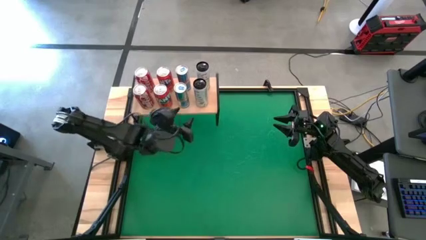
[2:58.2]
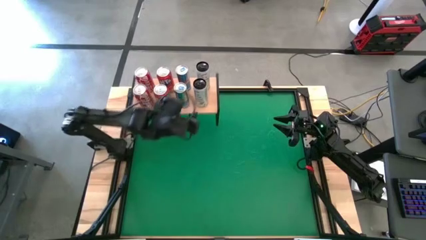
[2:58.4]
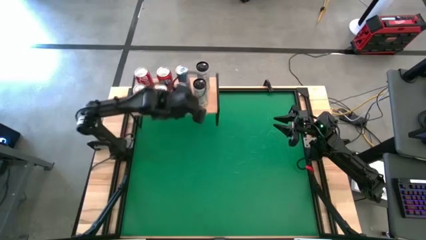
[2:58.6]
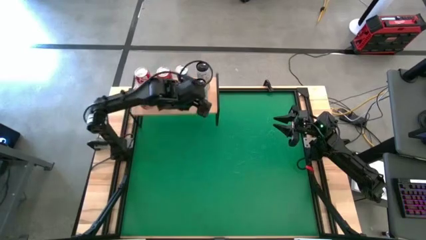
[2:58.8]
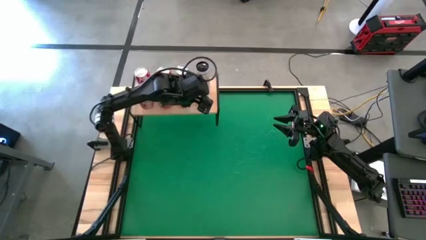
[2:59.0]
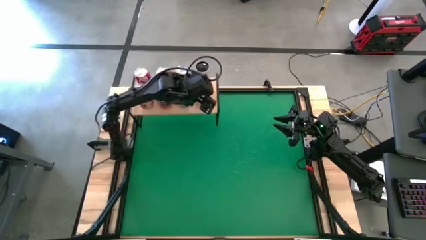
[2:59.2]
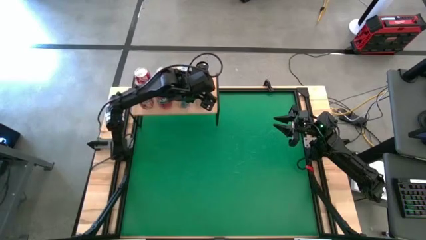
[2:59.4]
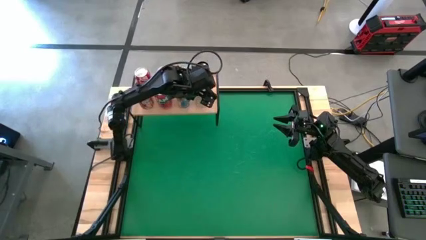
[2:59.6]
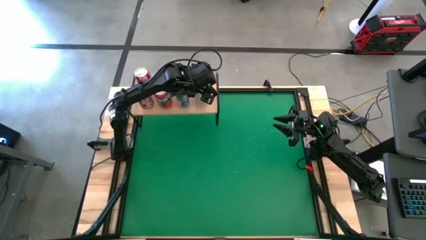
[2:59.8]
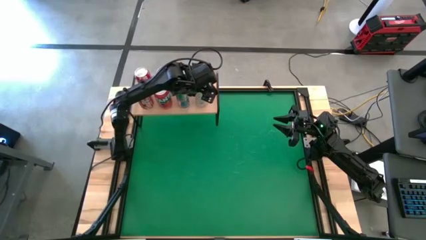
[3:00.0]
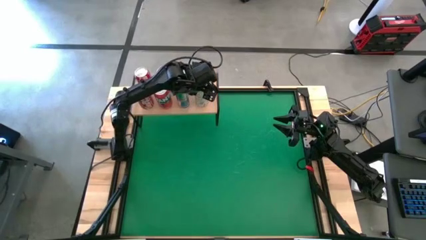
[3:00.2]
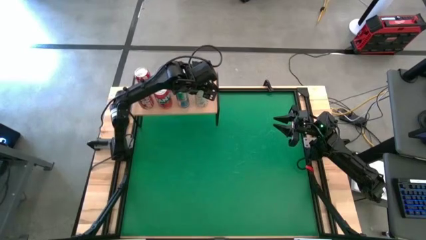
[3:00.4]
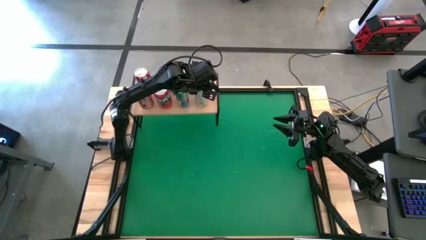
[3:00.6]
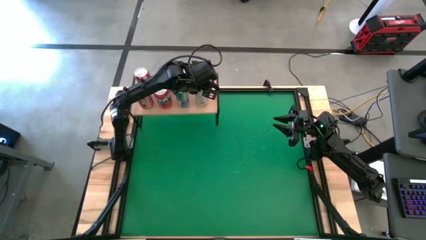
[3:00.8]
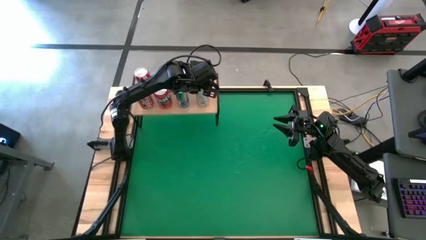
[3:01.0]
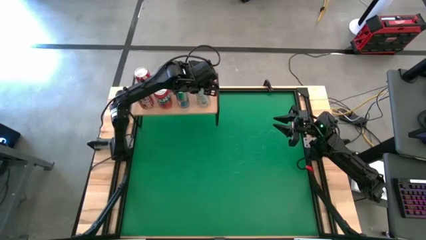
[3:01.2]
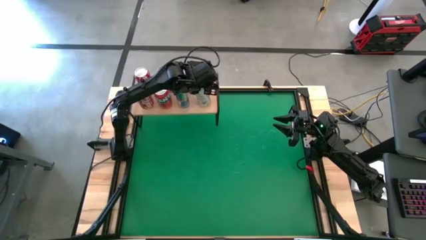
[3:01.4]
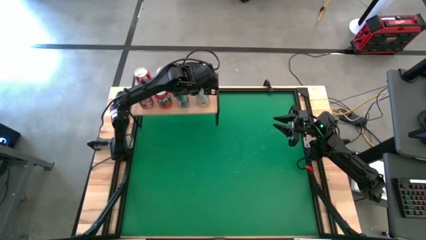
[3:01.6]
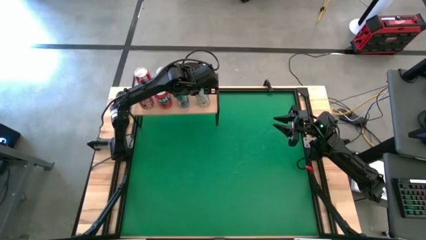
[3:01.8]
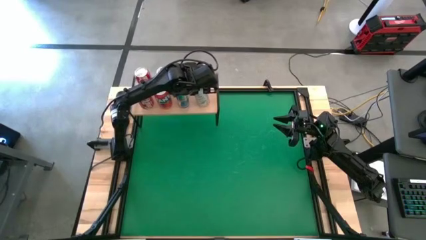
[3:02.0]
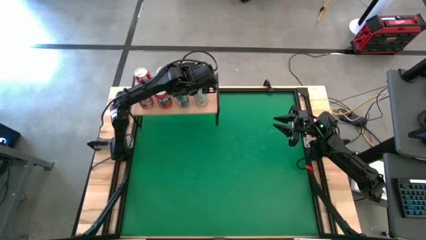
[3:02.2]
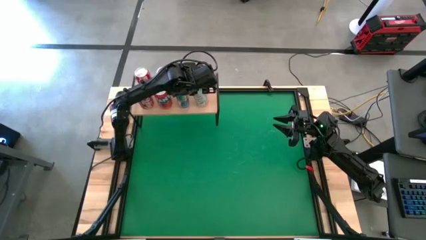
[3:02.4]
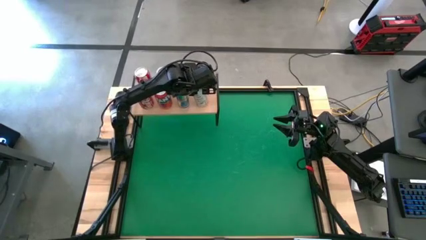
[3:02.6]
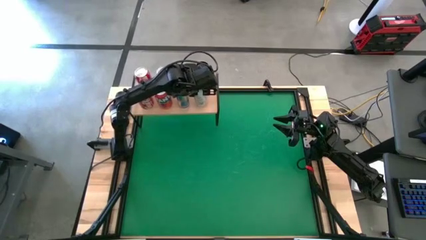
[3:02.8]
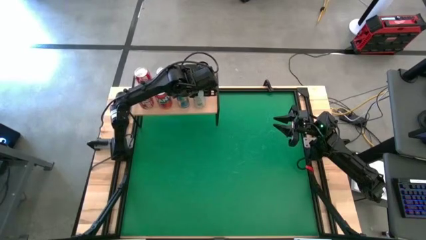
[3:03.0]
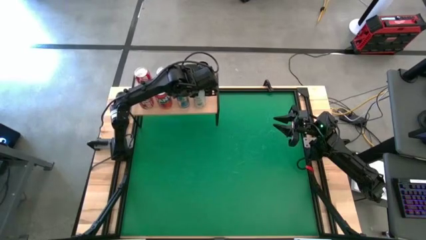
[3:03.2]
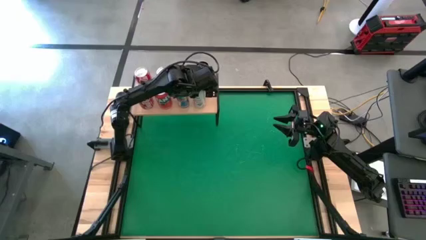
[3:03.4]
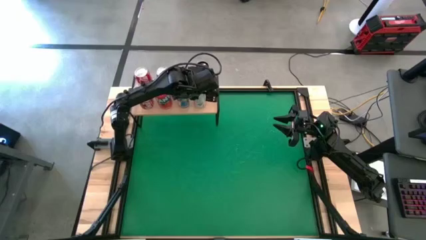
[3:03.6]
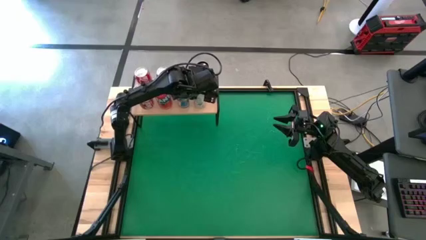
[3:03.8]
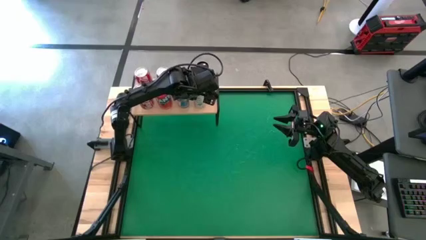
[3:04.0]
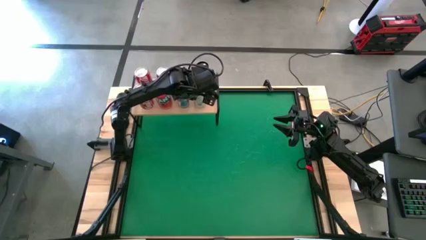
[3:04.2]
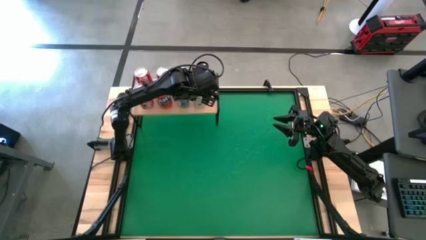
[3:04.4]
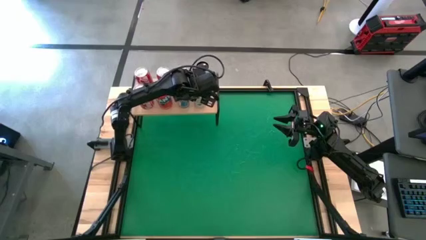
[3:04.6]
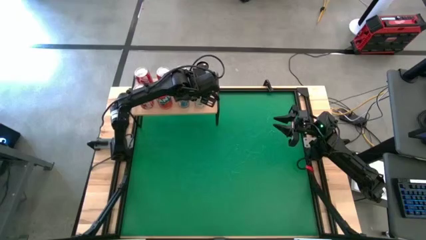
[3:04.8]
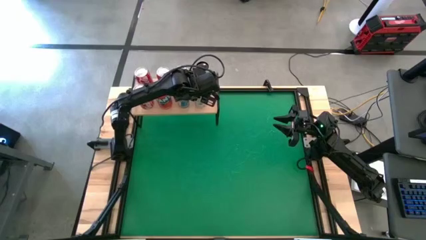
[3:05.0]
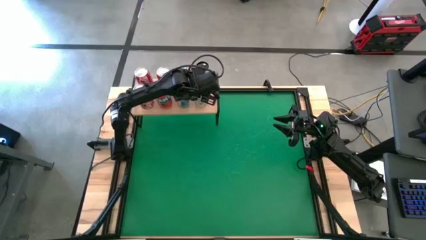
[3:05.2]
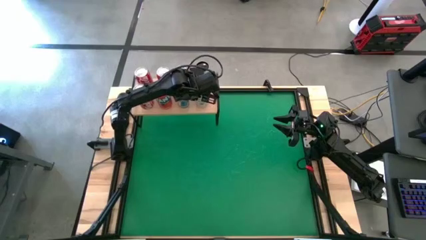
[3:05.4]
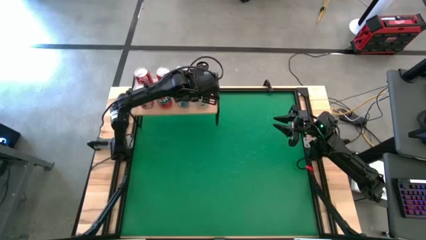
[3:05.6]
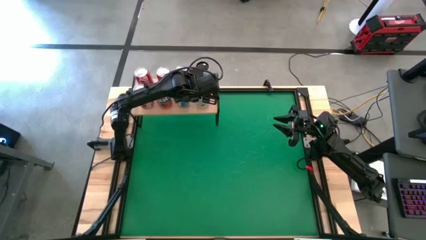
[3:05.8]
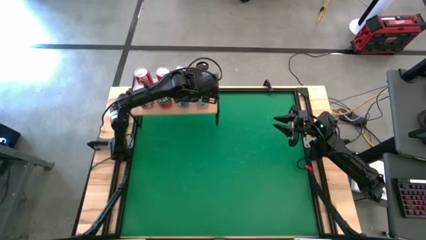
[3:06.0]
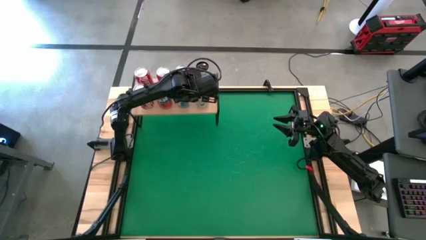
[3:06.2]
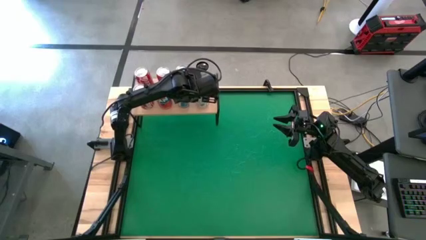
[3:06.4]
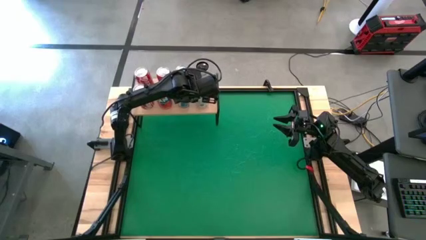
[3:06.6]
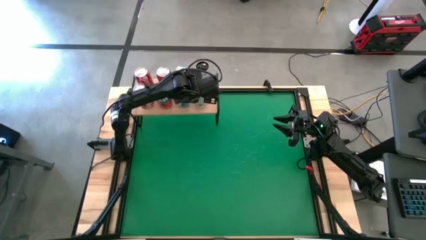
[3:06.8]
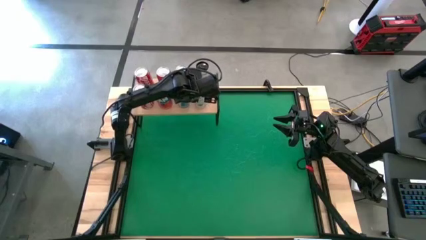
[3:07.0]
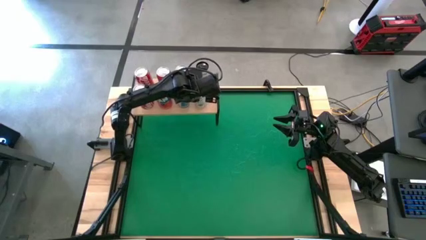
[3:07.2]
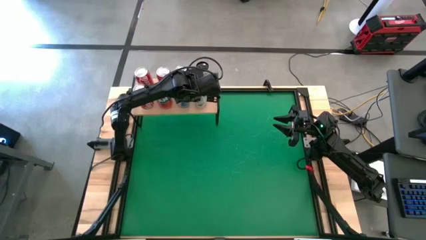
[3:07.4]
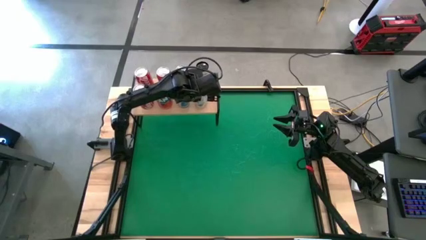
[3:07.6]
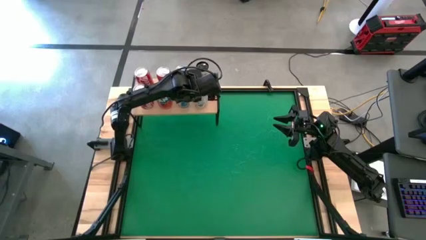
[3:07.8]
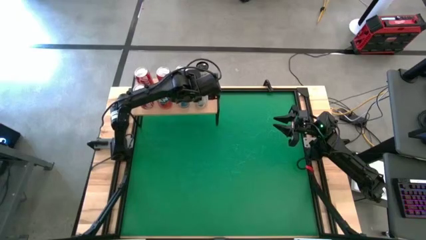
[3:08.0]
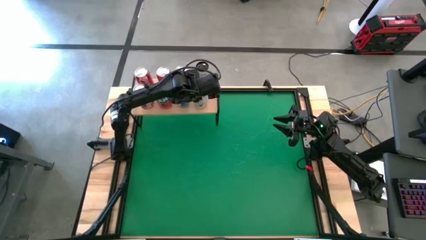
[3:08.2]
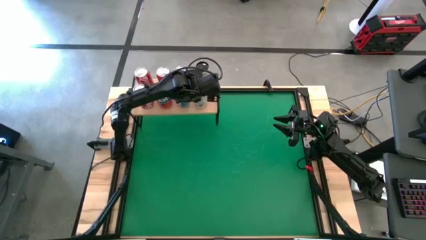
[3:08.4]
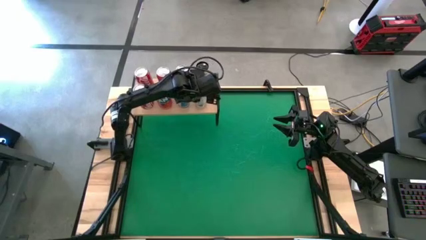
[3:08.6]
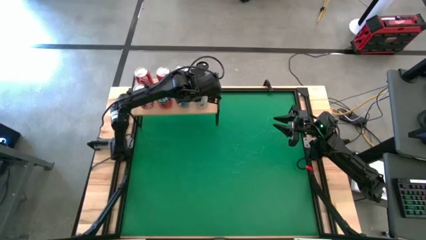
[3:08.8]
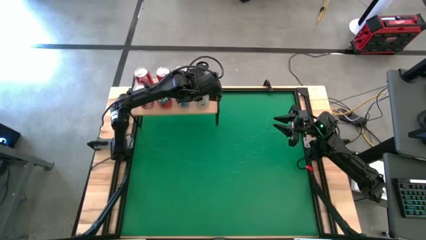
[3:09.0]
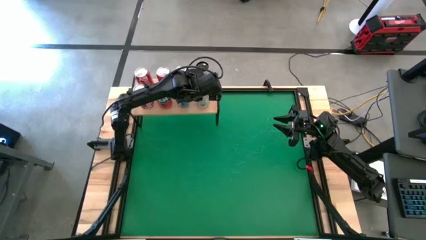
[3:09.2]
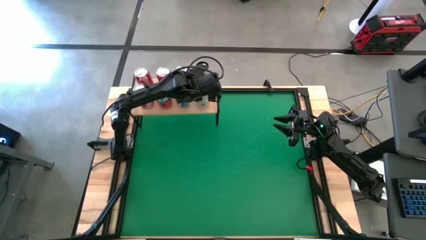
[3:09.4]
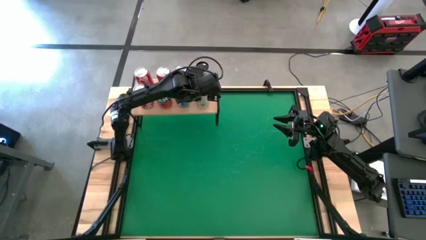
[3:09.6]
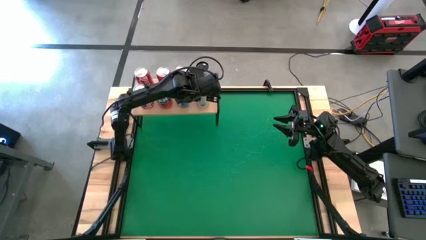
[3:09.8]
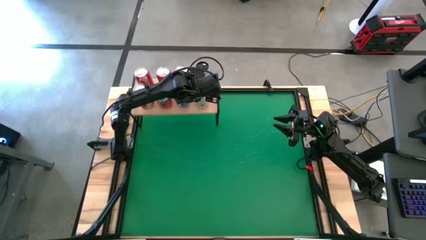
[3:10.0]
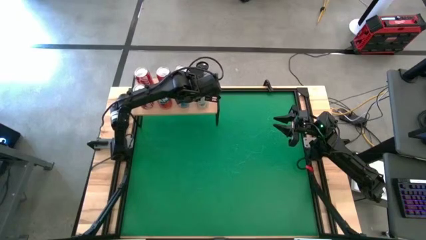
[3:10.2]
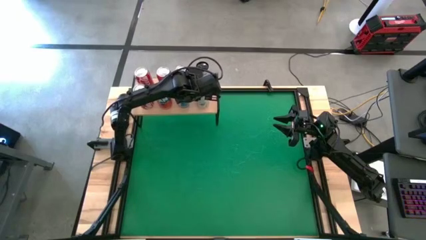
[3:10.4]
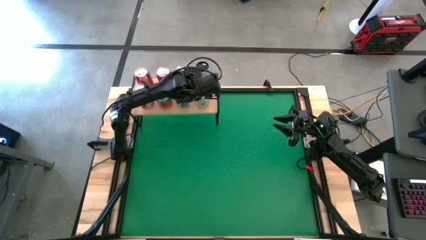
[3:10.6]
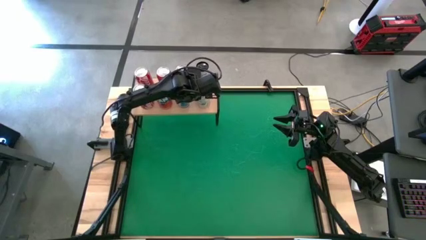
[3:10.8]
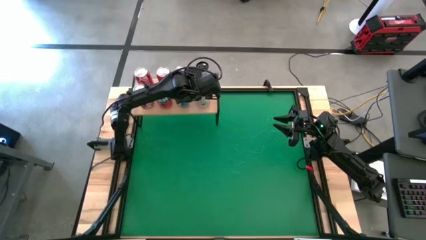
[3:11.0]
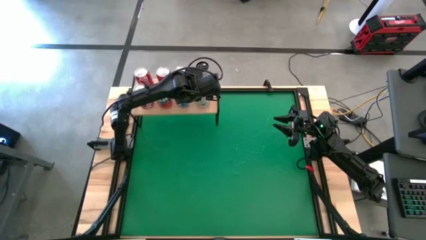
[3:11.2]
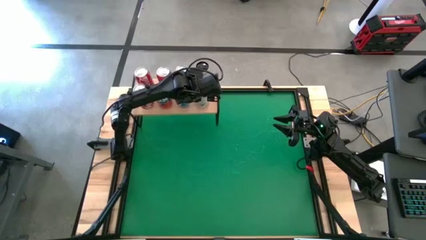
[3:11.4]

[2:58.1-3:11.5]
Task: Place canned beverage on shelf
Put the white soda aligned with the other white soda can can on the shelf
